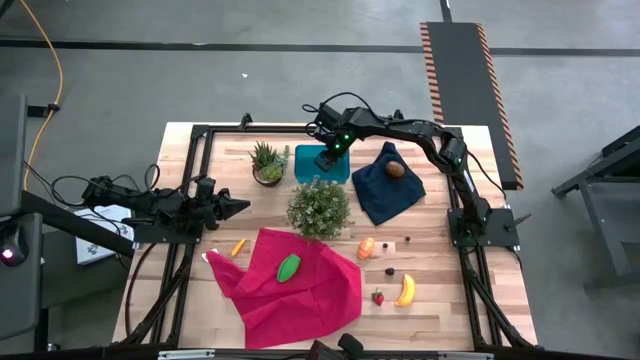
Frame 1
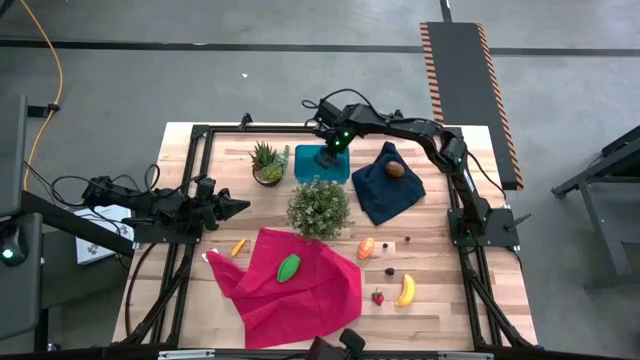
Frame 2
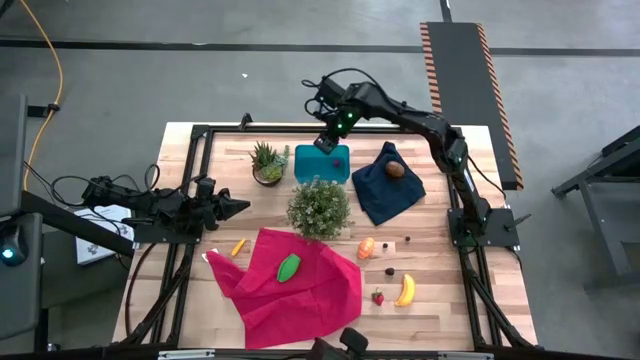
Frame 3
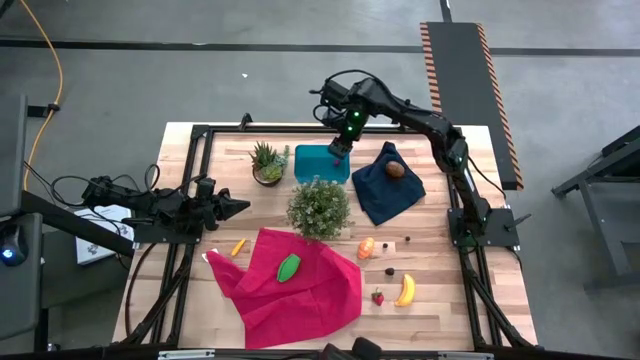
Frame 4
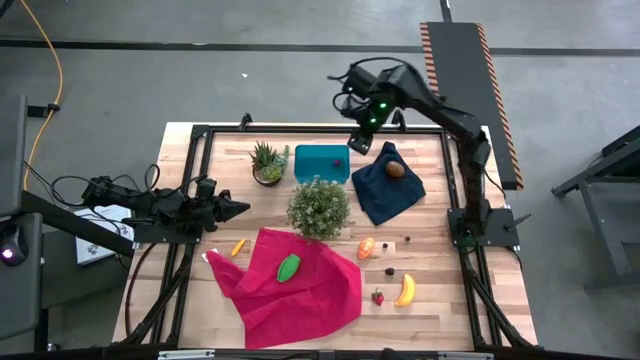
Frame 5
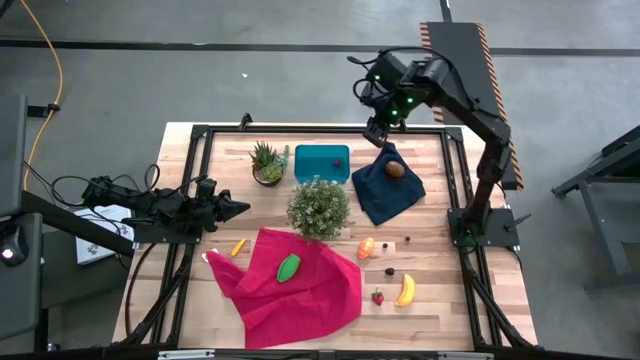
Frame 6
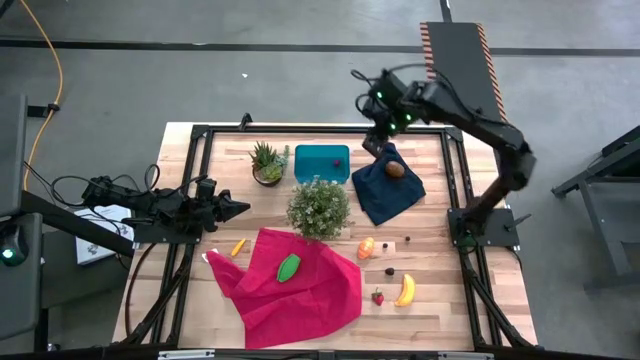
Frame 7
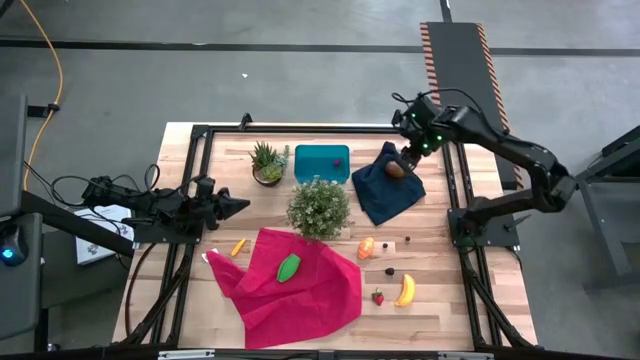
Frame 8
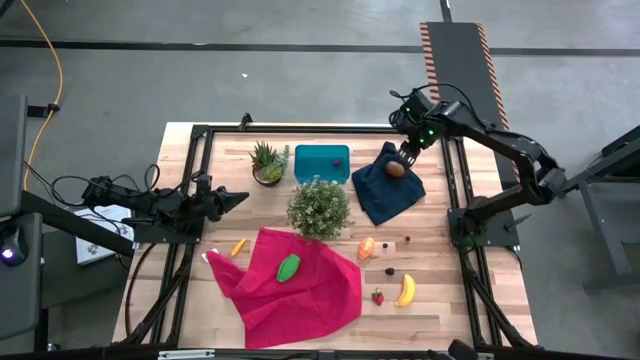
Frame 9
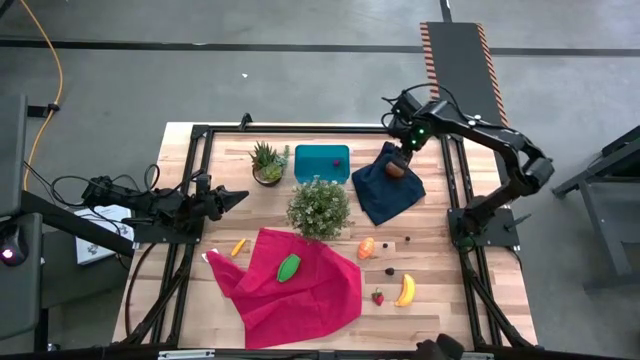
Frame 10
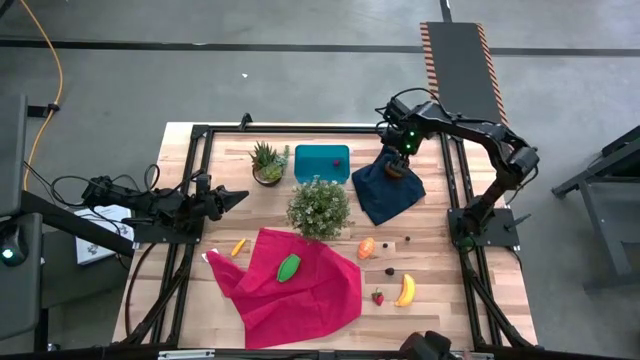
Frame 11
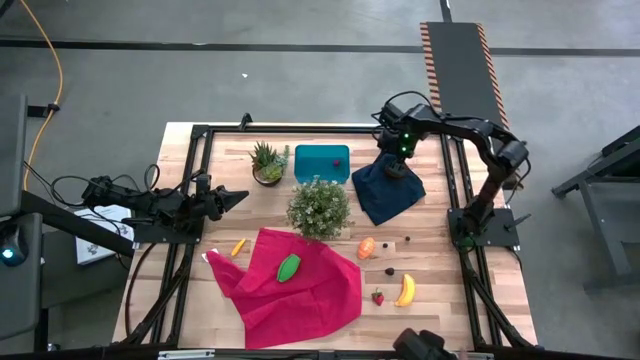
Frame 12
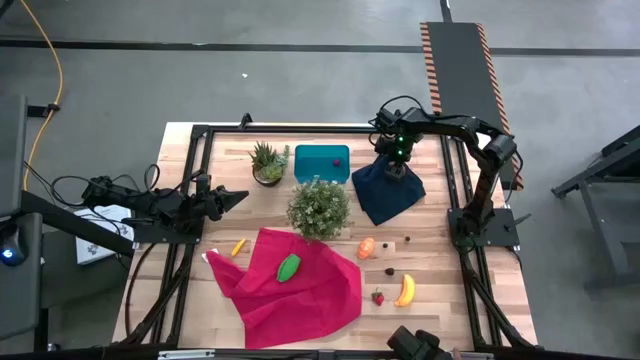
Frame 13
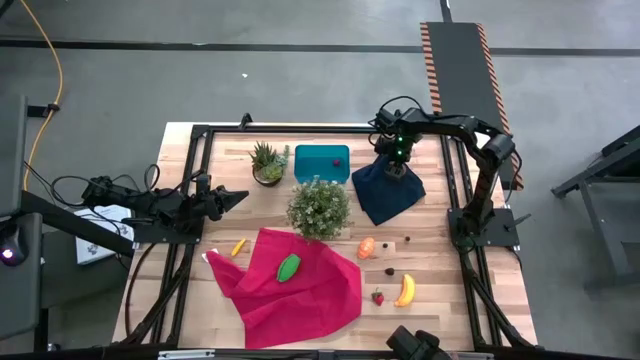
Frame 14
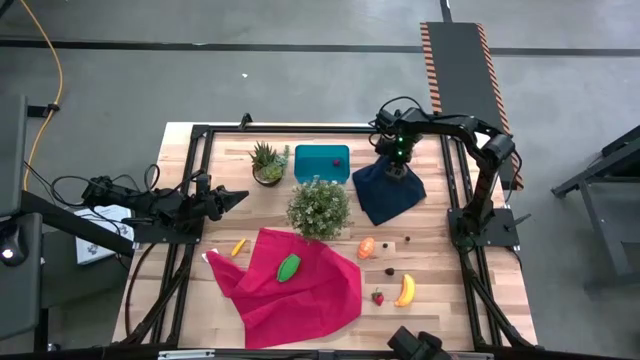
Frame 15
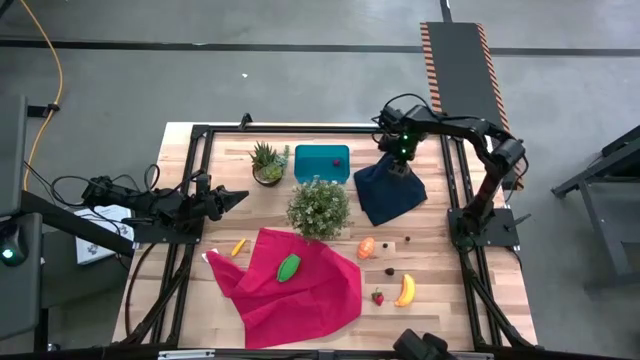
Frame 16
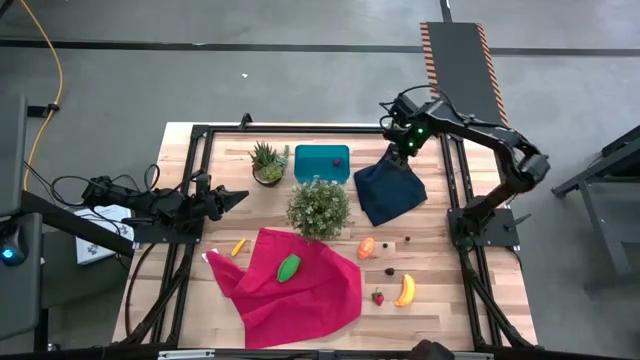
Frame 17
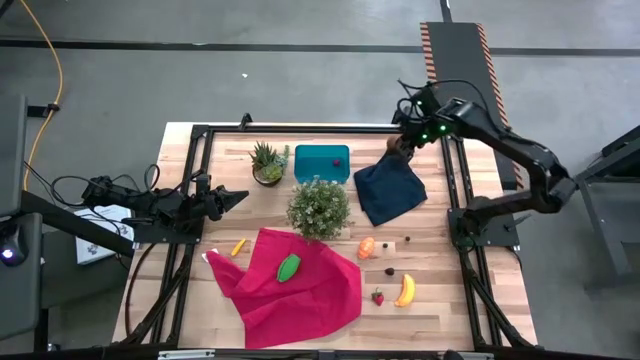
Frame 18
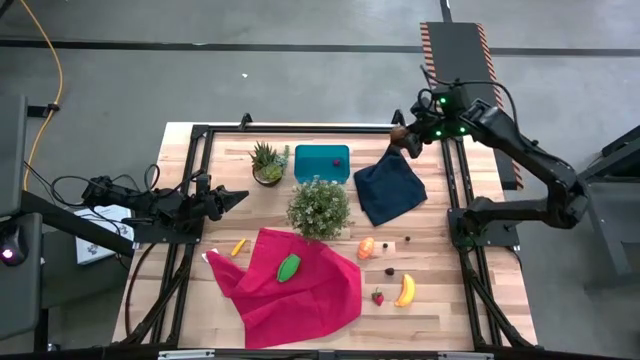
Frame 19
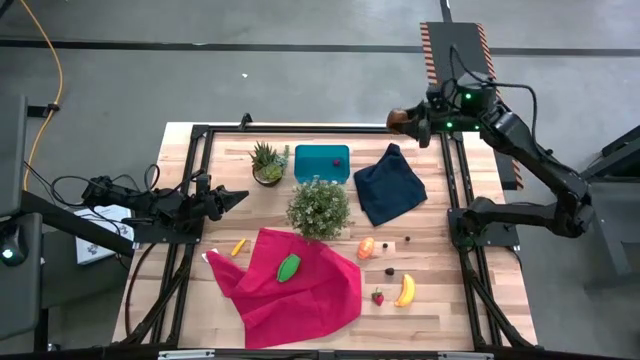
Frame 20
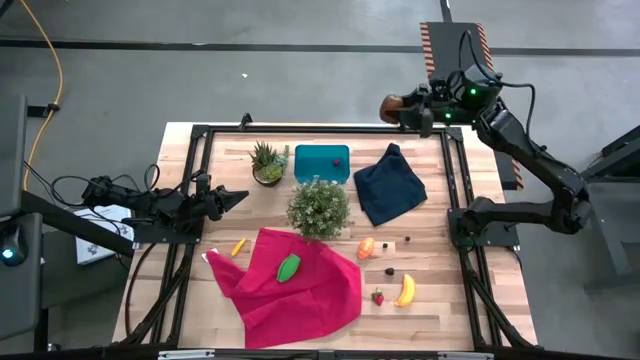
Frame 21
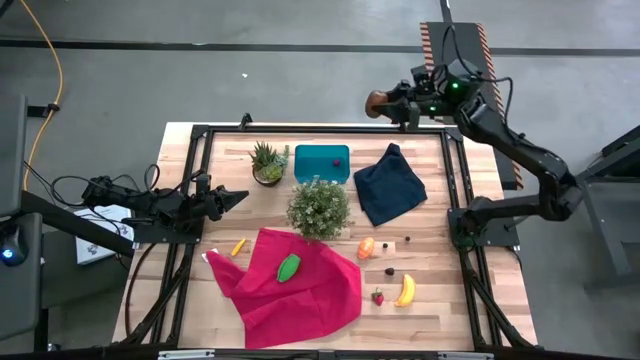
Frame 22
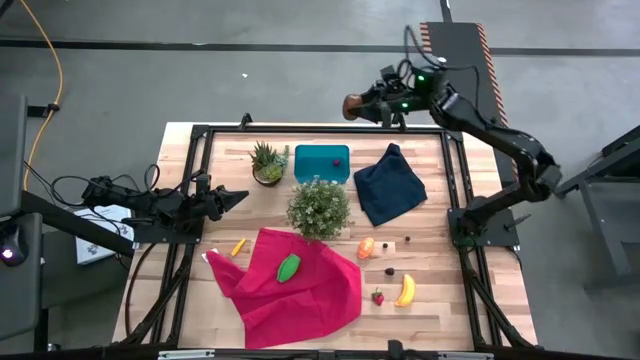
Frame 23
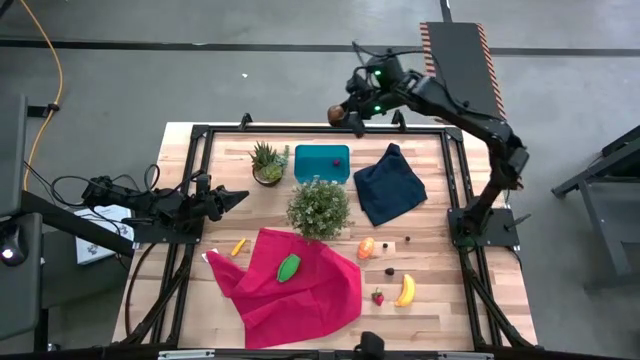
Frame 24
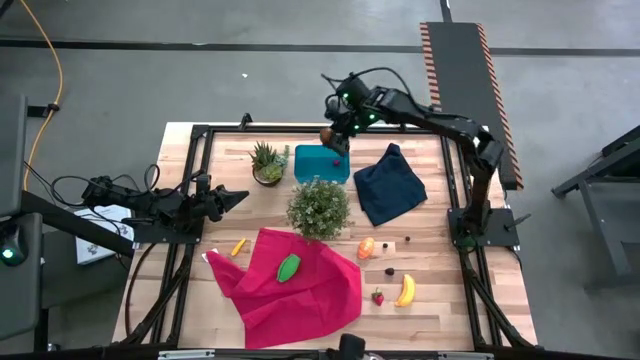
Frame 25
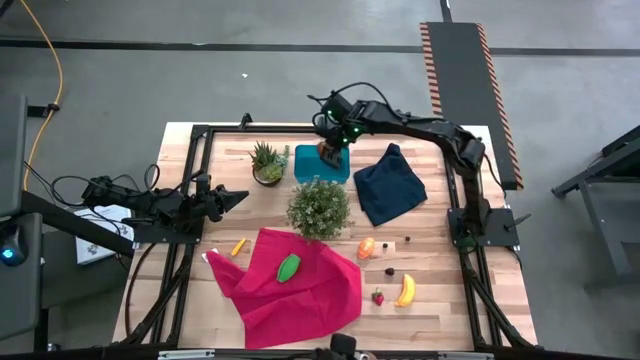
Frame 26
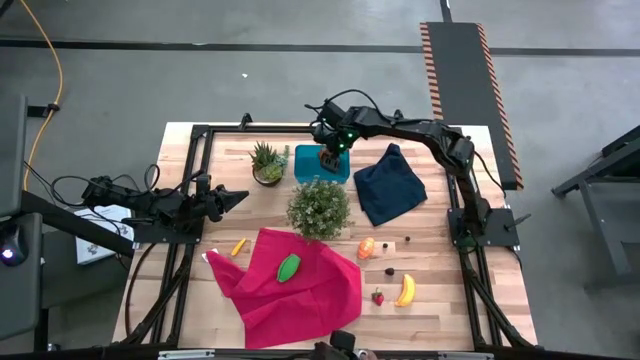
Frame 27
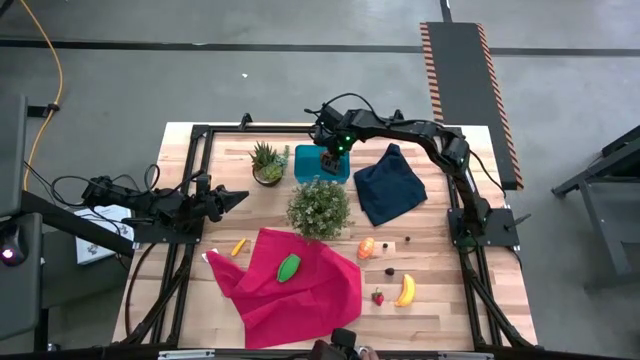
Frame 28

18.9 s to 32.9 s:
Task: Pick and placing Produce into tupperware
Put the brown kiwi into the blue bin
